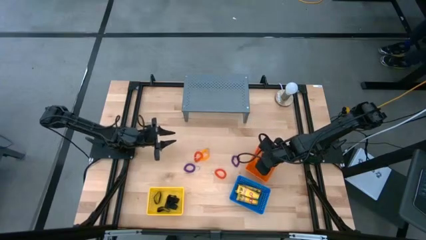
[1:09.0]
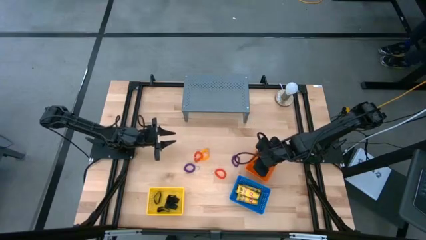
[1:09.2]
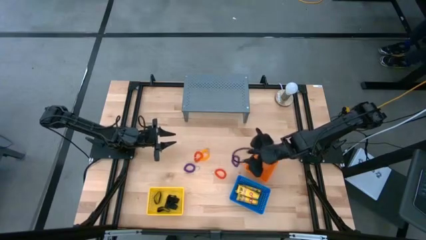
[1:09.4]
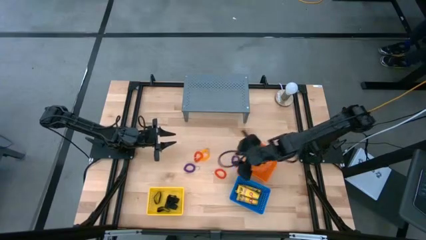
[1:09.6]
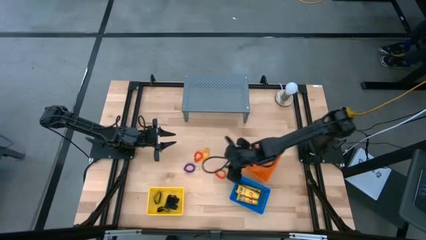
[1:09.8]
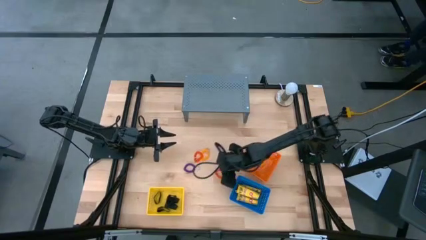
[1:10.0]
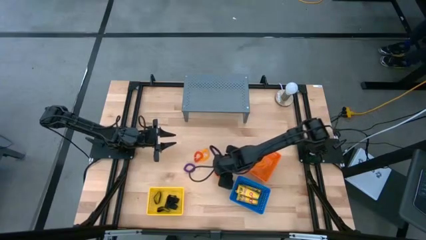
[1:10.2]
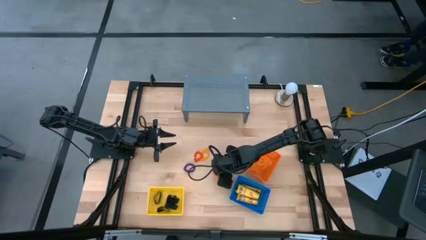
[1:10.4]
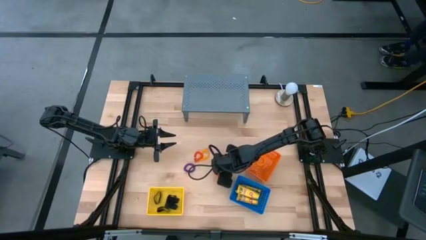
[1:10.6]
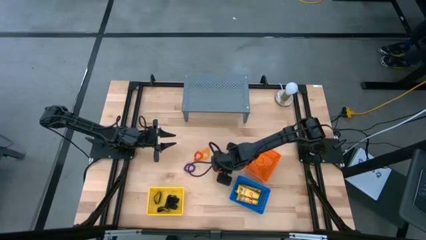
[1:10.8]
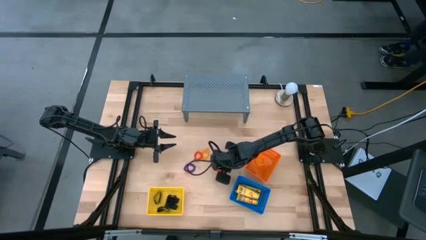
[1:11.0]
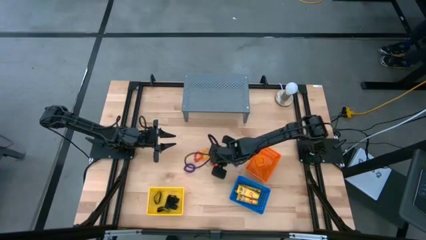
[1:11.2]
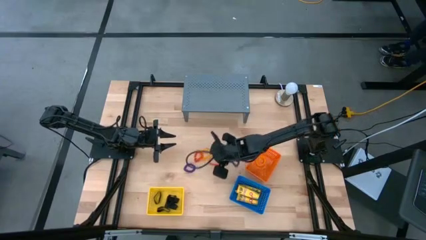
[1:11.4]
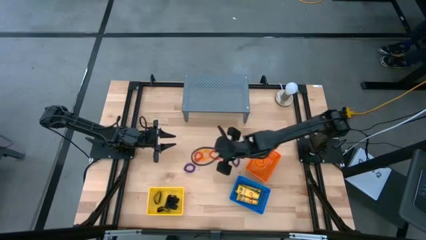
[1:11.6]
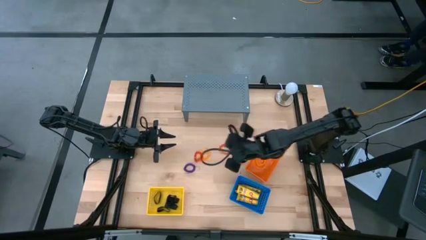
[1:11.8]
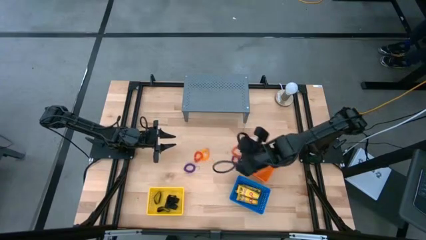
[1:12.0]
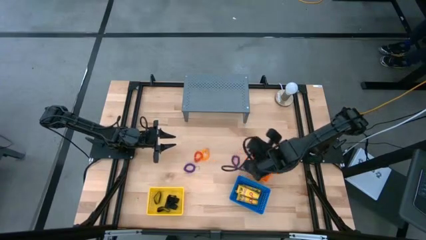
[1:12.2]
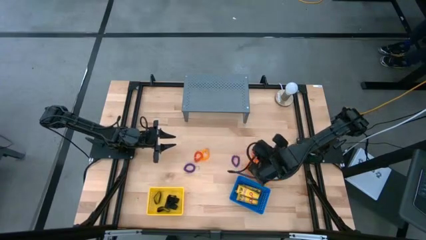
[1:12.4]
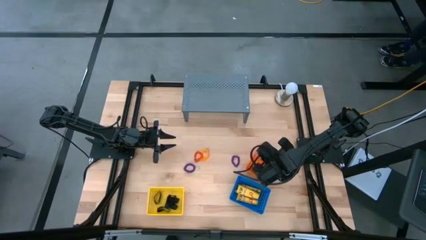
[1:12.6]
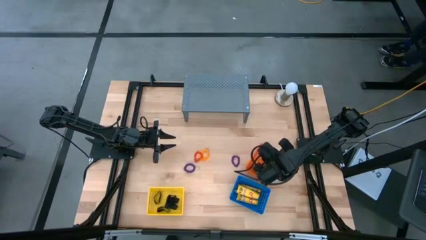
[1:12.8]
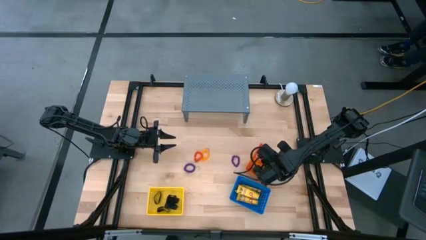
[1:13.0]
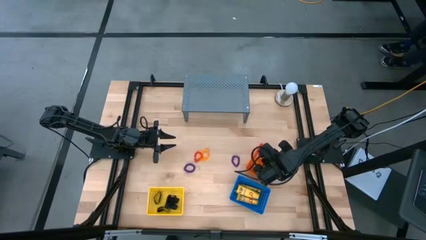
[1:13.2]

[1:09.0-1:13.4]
Task: Pick & Place Office Desk Supplies
Put the orange spring keychain into the orange basket

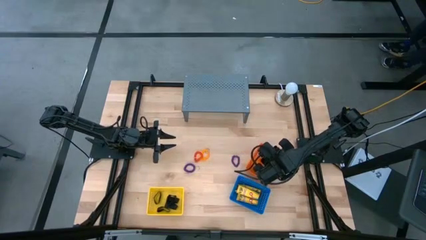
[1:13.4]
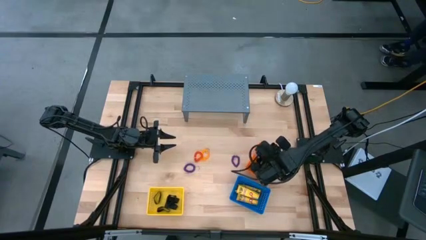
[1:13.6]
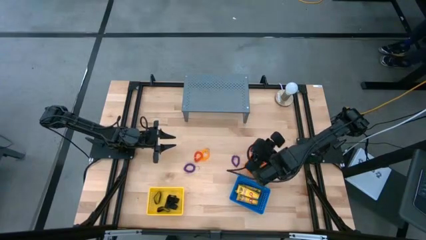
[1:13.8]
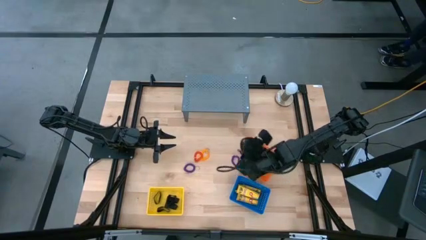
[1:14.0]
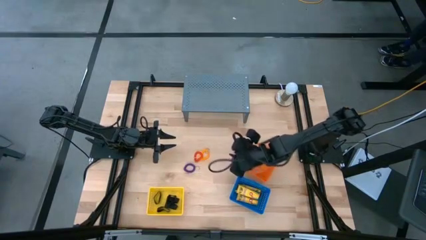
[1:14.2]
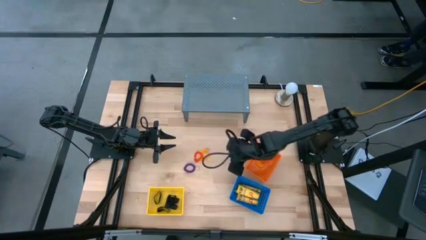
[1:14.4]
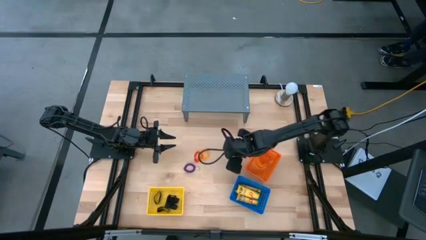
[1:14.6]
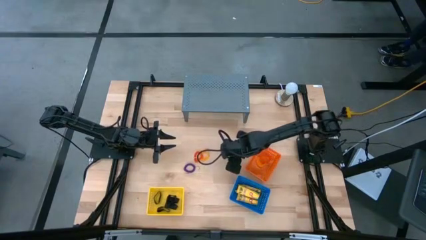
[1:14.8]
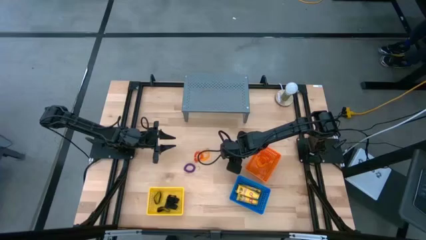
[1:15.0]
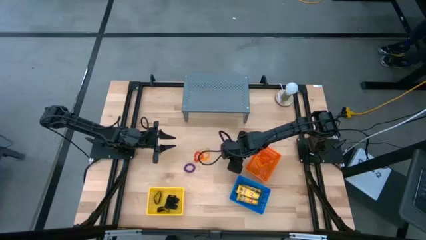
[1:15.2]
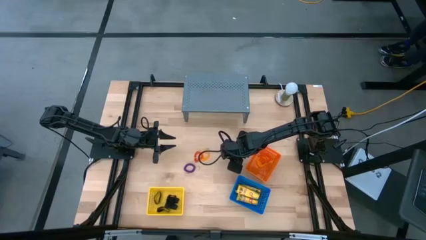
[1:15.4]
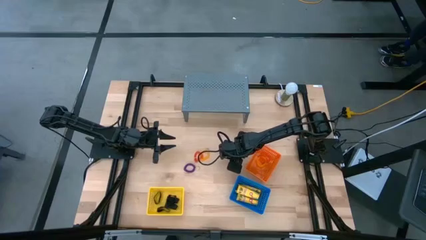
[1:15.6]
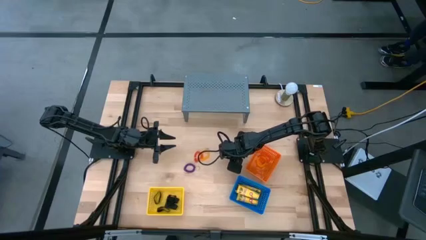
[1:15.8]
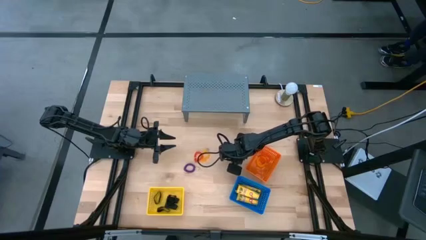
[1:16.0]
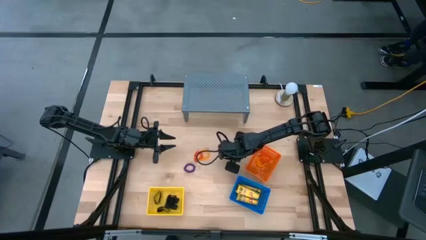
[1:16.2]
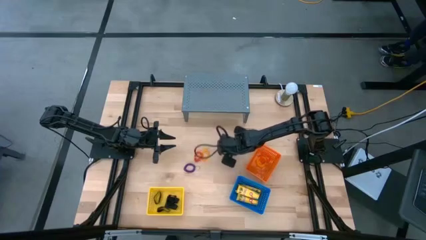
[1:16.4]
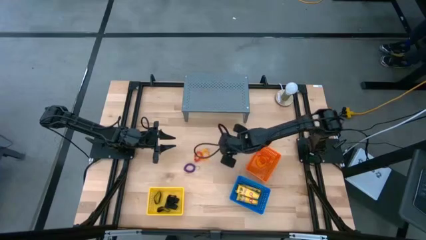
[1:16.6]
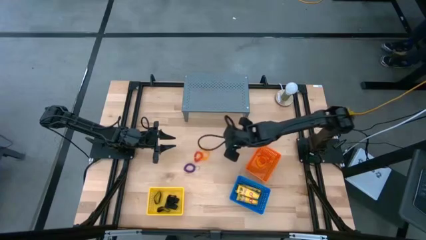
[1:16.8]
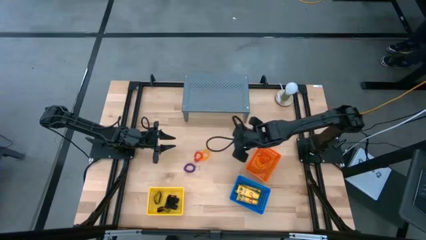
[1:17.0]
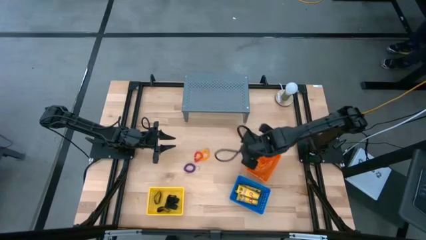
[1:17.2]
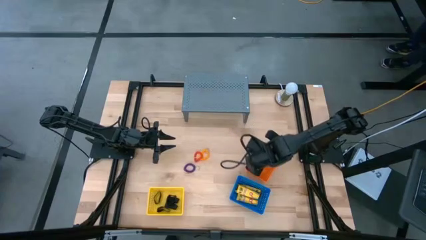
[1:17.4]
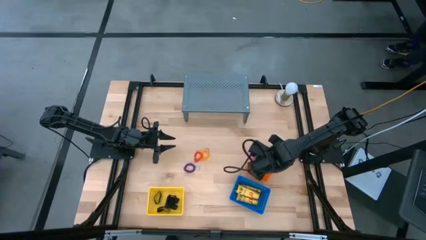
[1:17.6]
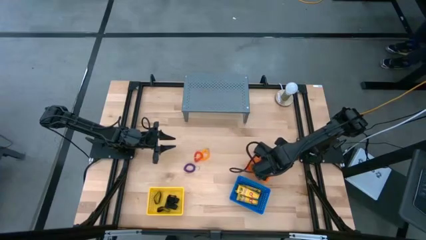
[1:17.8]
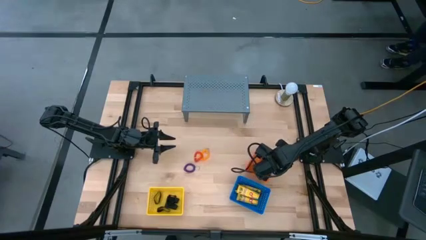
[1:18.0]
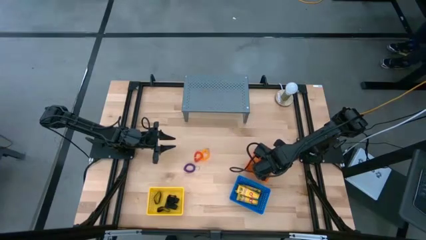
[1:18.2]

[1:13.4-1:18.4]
Put the violet spring keychain into the orange basket

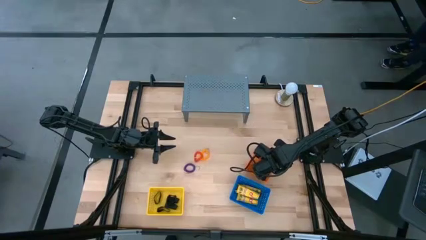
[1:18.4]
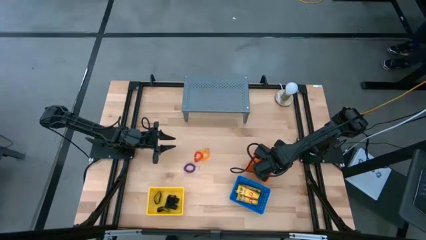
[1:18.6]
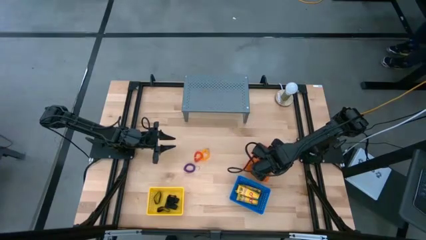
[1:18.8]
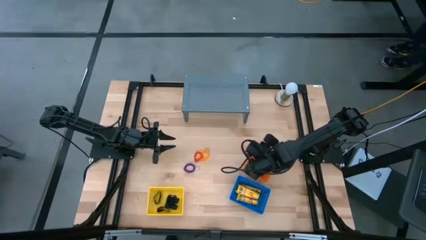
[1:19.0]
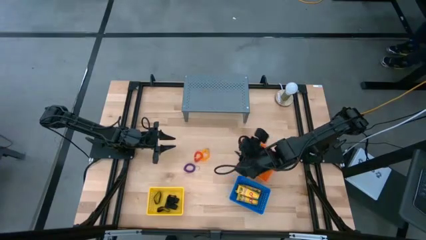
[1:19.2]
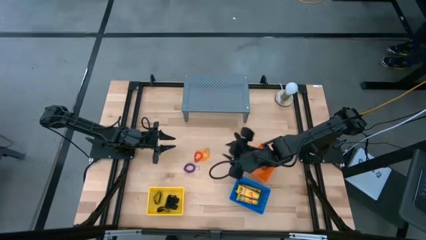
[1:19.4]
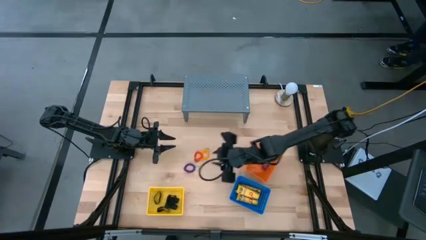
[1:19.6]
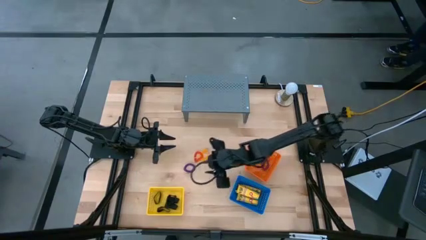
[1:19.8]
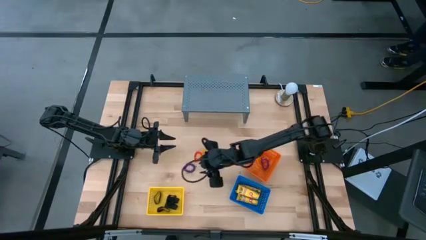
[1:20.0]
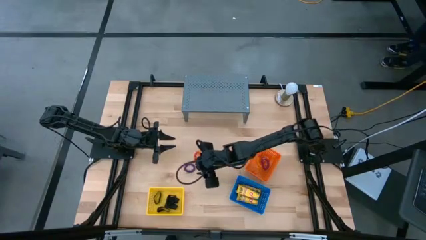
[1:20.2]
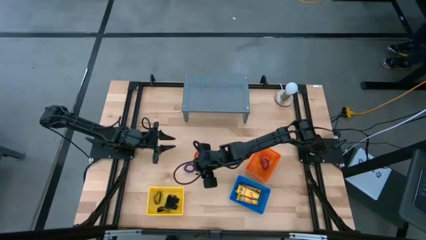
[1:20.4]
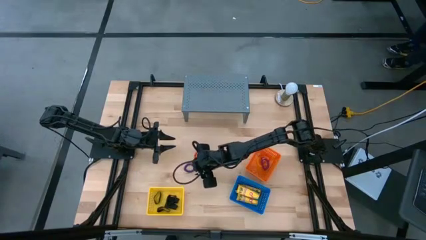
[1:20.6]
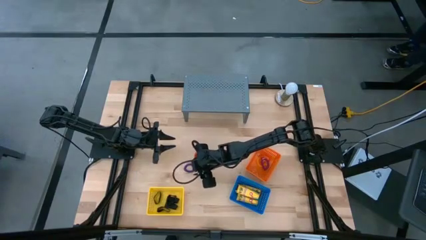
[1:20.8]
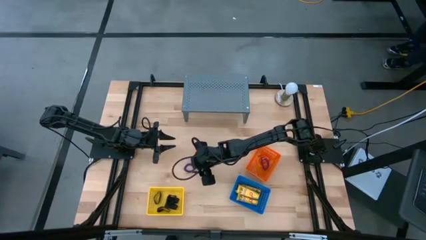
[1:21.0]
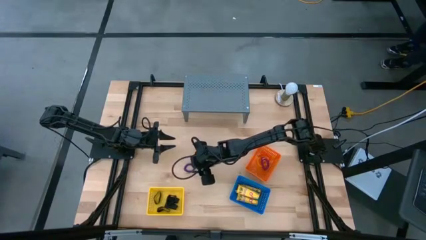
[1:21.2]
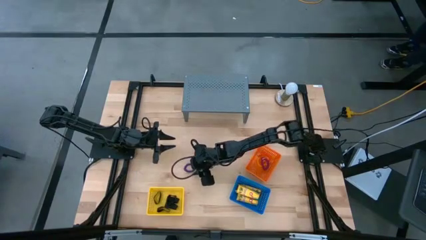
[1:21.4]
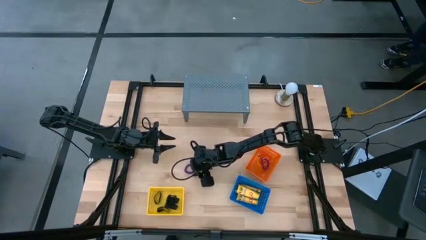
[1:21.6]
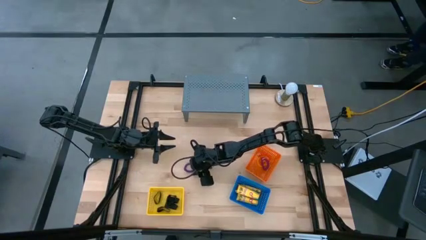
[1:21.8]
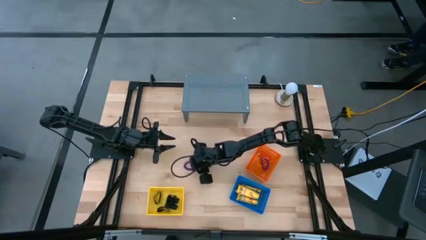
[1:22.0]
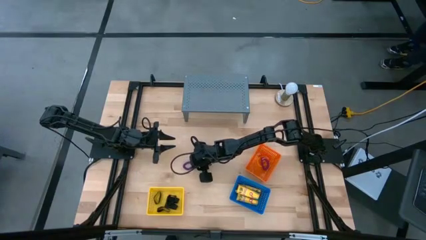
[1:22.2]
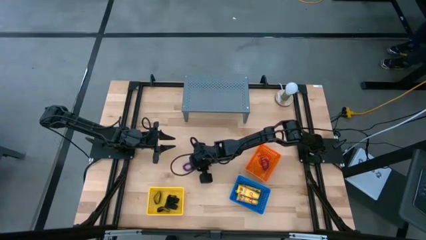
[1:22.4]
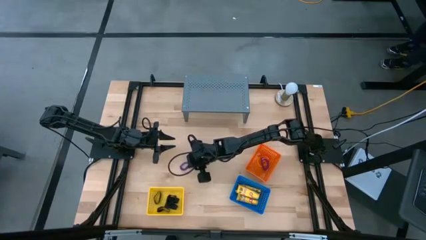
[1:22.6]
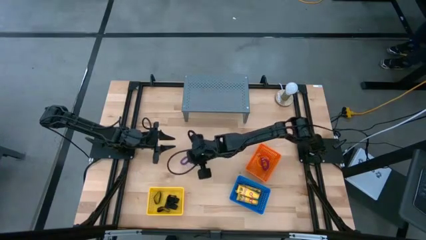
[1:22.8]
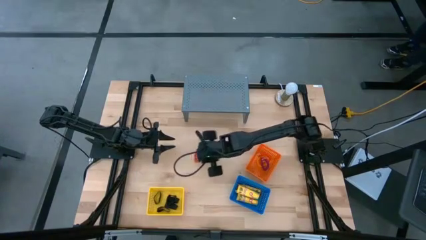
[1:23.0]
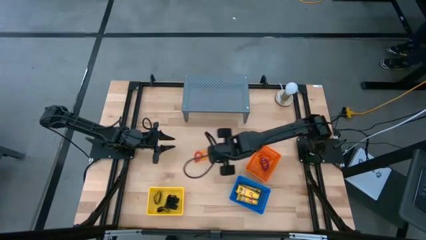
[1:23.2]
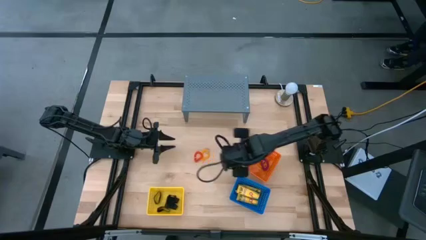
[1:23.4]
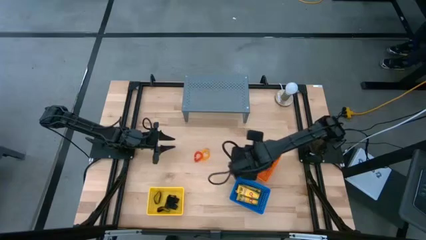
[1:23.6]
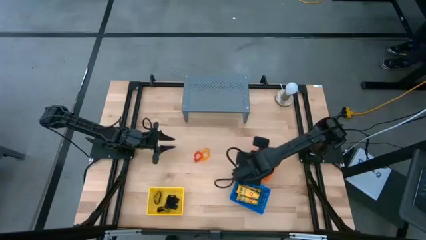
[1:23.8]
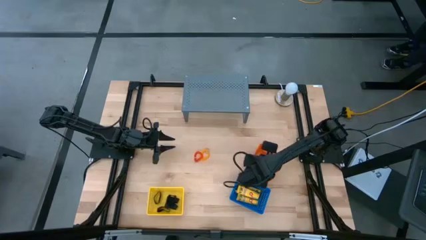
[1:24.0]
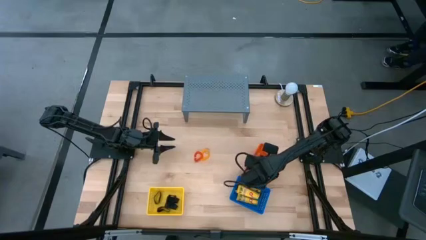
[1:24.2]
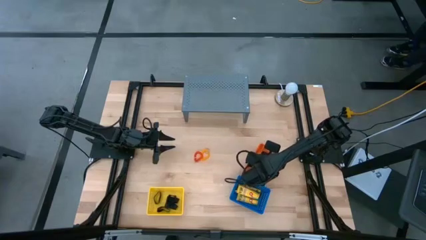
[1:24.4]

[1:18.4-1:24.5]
Put the violet spring keychain into the orange basket

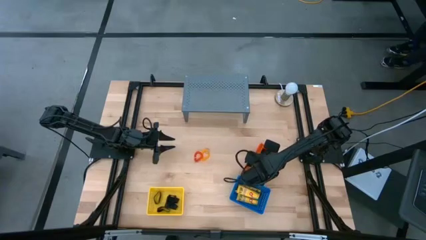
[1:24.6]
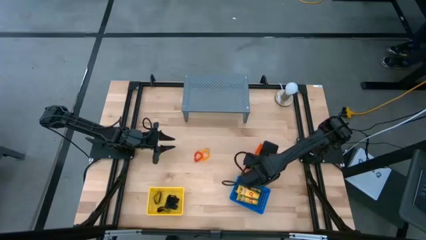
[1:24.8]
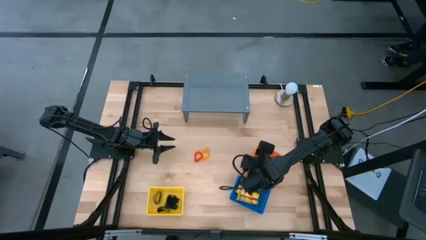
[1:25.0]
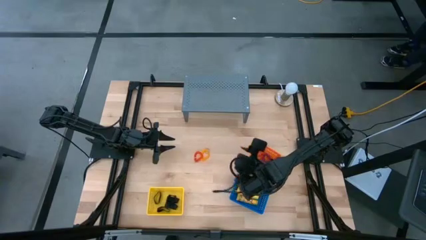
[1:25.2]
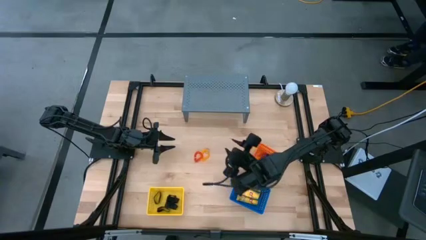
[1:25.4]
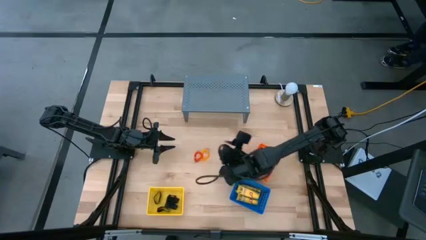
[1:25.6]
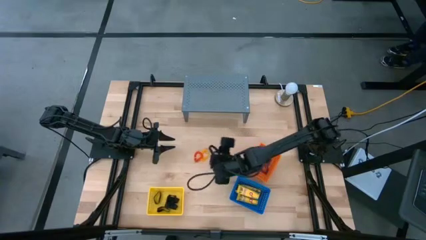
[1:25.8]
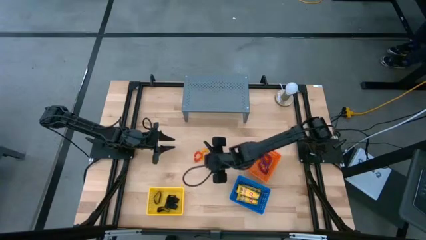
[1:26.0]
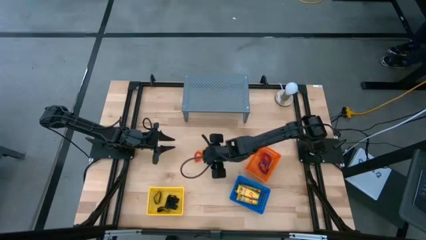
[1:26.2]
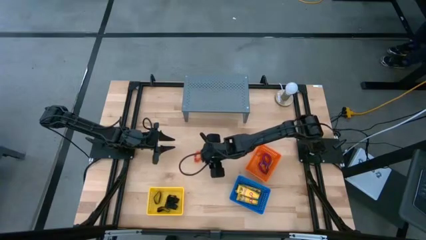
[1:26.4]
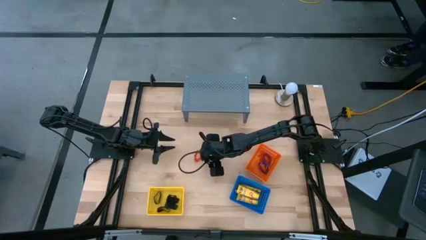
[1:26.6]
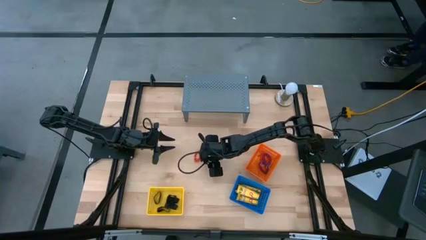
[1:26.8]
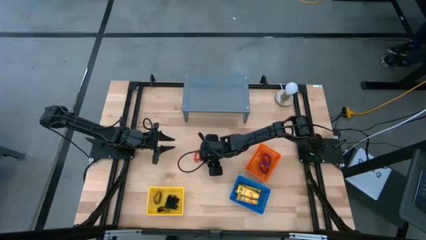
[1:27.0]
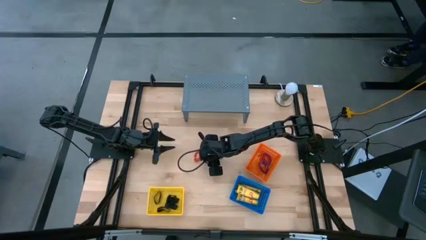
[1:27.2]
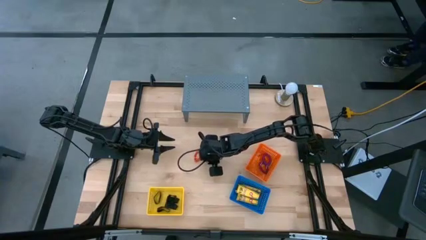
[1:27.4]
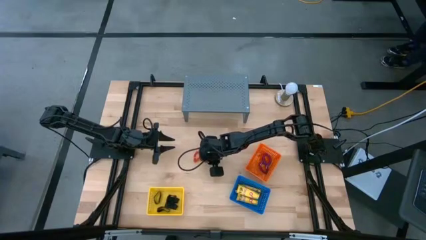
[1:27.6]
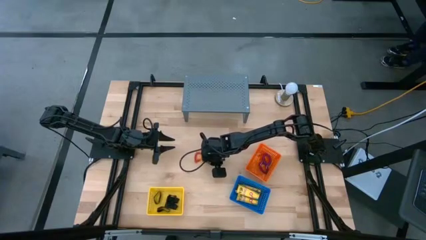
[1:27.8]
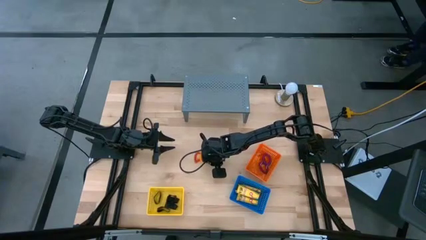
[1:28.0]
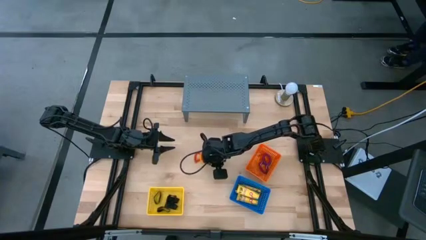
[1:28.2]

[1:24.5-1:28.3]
Put the yellow spring keychain into the orange basket
